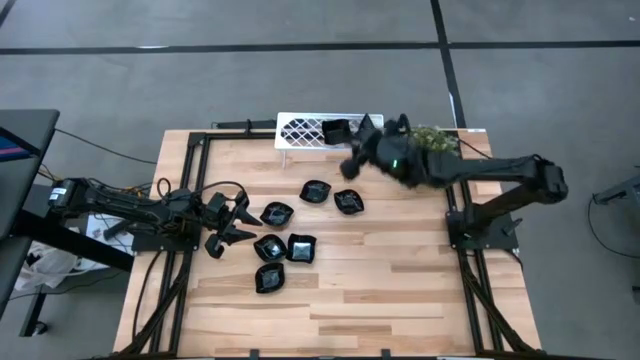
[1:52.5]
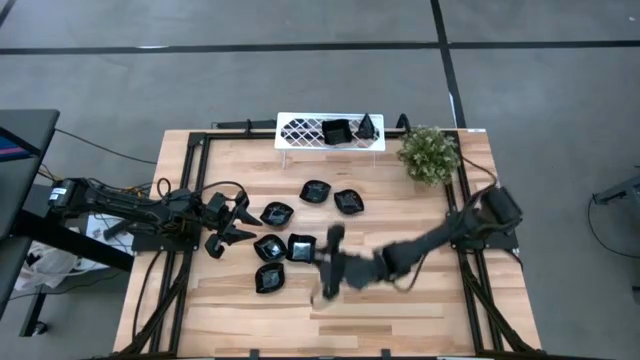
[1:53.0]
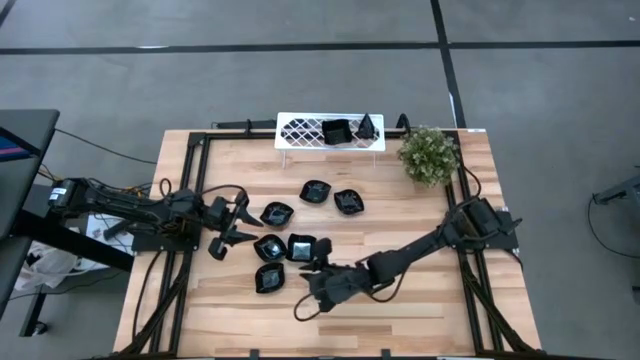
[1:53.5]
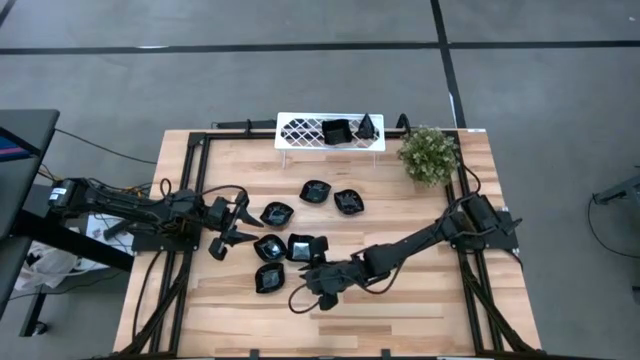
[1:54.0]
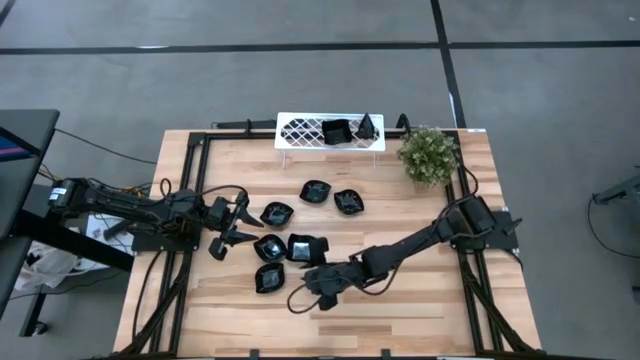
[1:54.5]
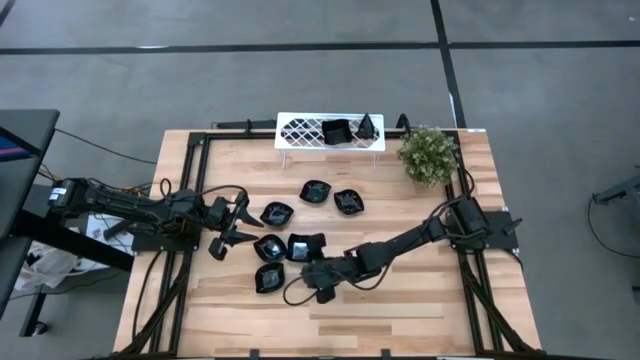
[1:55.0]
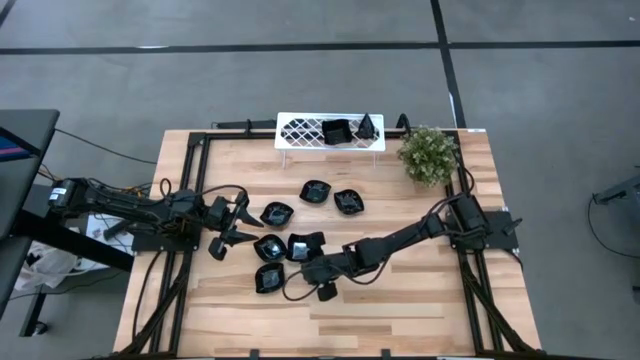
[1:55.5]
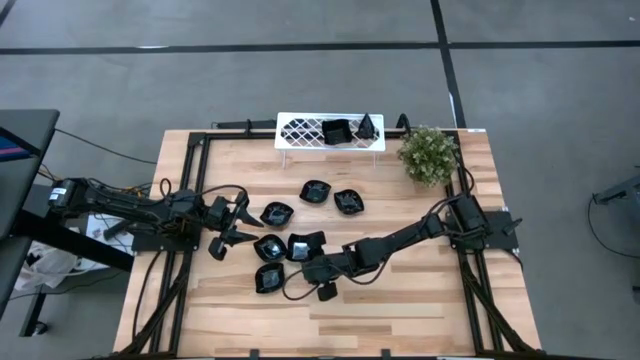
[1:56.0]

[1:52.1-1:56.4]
Task: Pick & Place Mini shaped plates
Stack the distorted square plate on top of the distorted square plates on the shelf

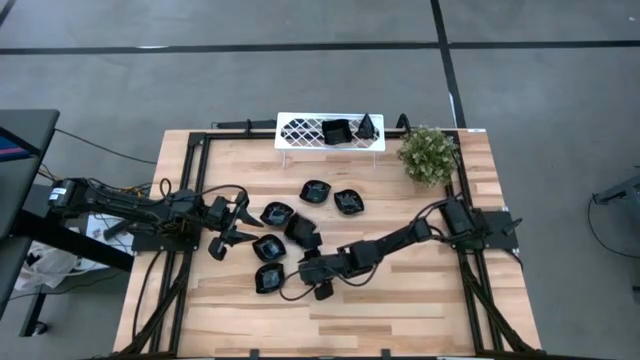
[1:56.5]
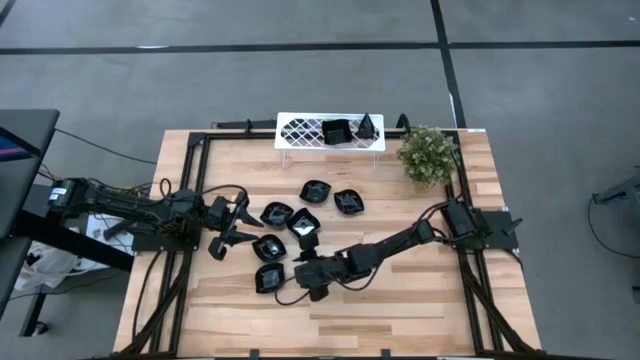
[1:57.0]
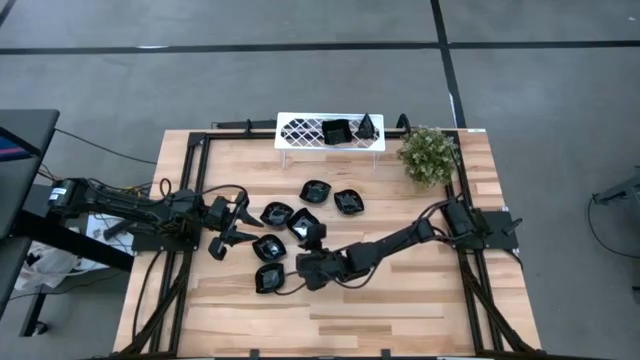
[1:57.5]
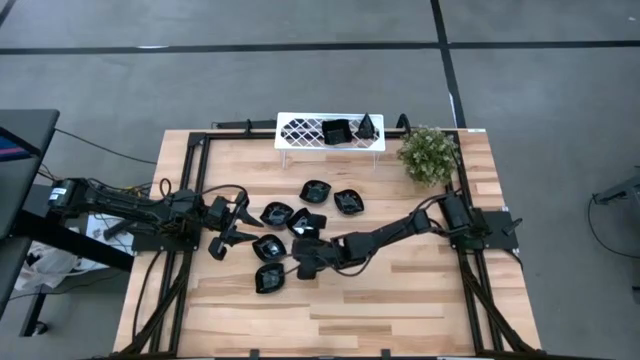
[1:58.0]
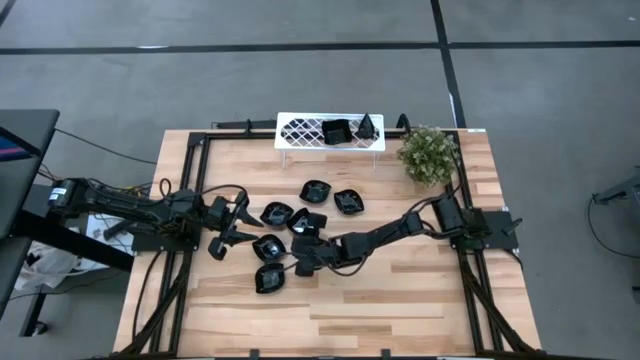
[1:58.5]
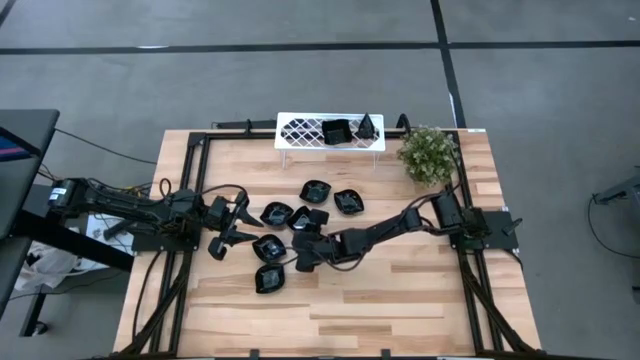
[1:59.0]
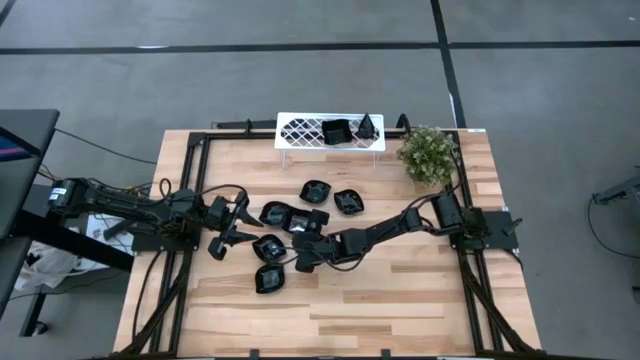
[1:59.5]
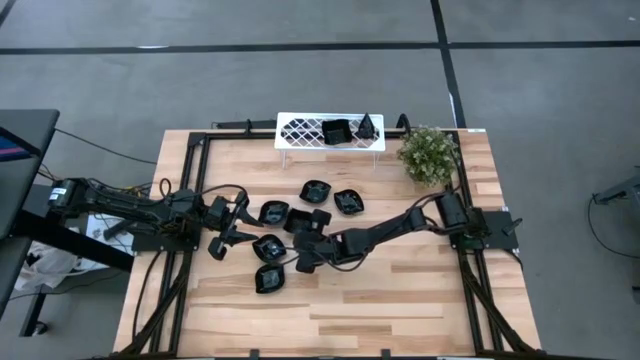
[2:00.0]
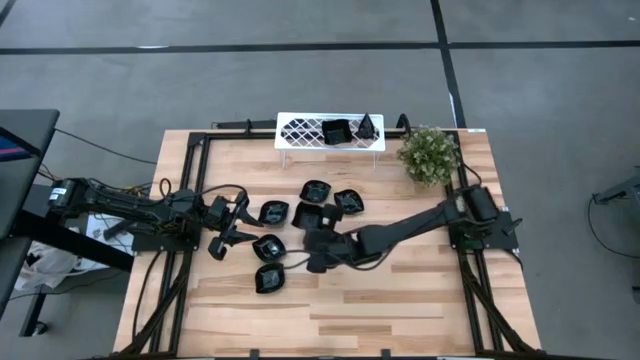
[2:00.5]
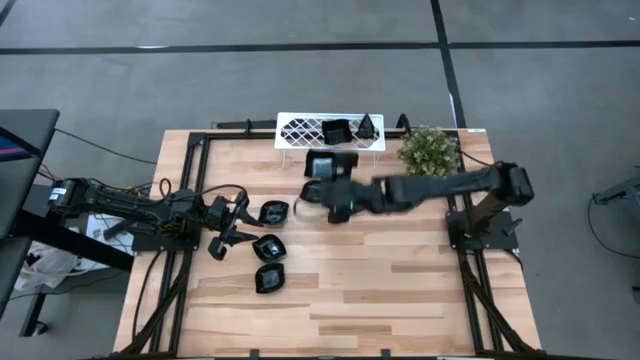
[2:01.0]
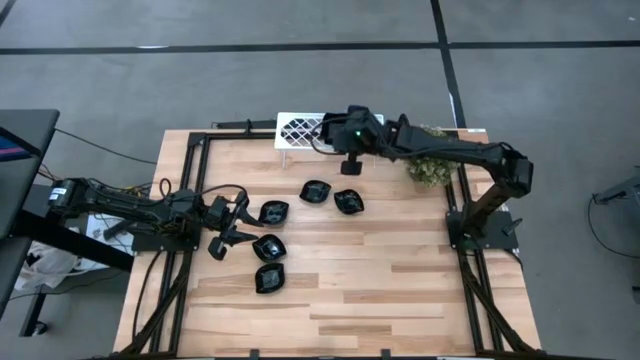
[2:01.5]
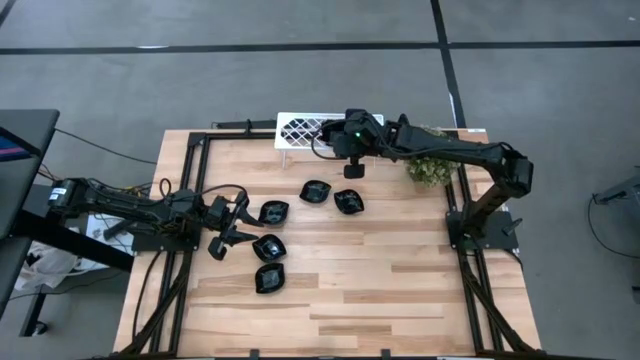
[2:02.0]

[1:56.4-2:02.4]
Stack the distorted square plate on top of the distorted square plates on the shelf

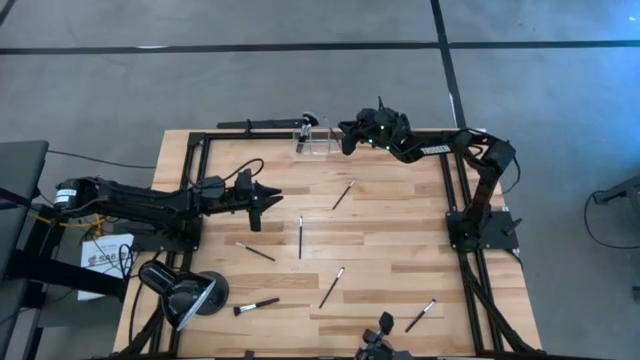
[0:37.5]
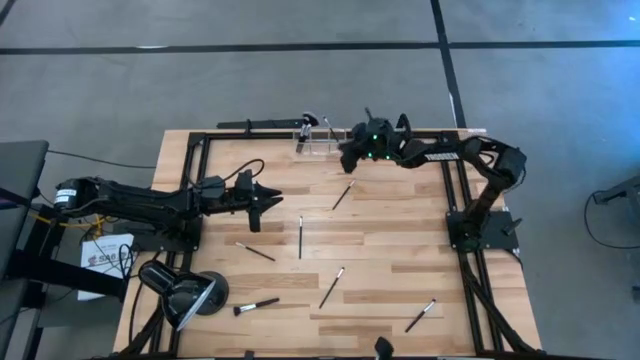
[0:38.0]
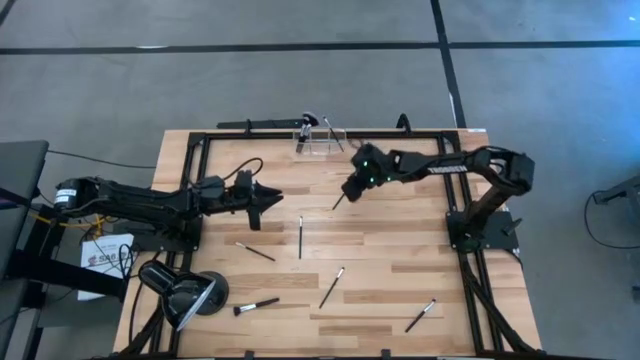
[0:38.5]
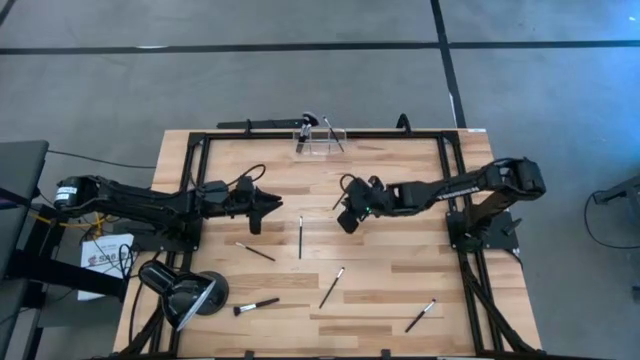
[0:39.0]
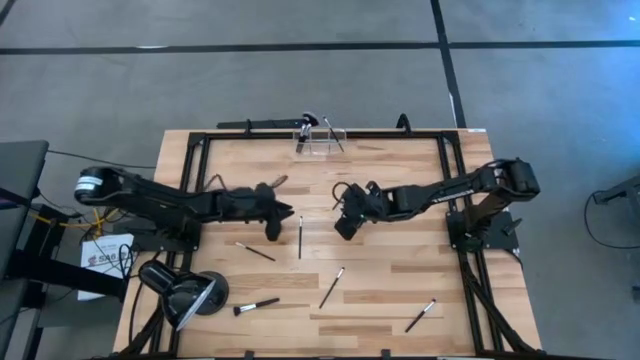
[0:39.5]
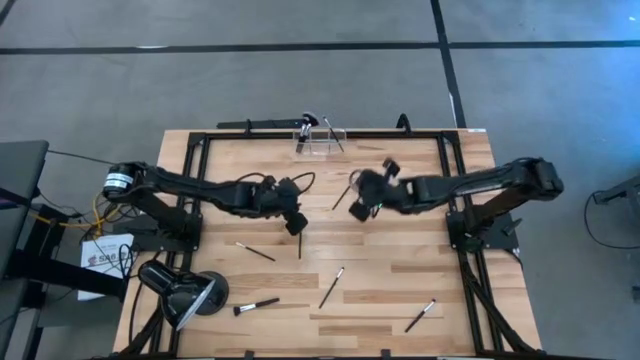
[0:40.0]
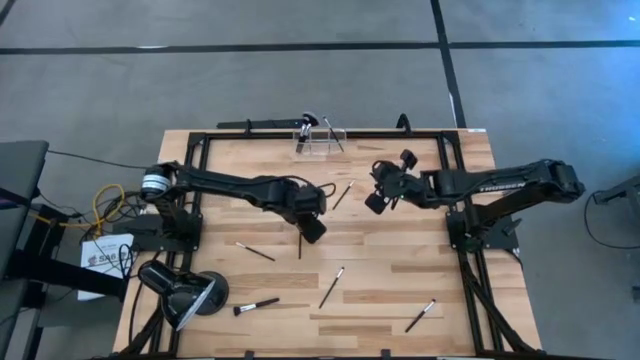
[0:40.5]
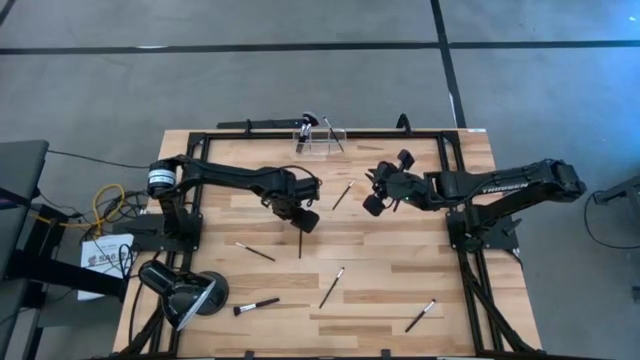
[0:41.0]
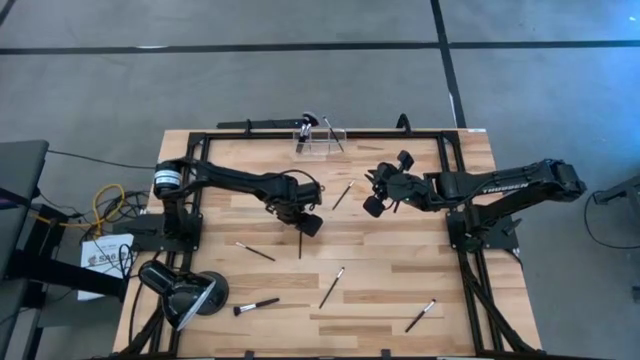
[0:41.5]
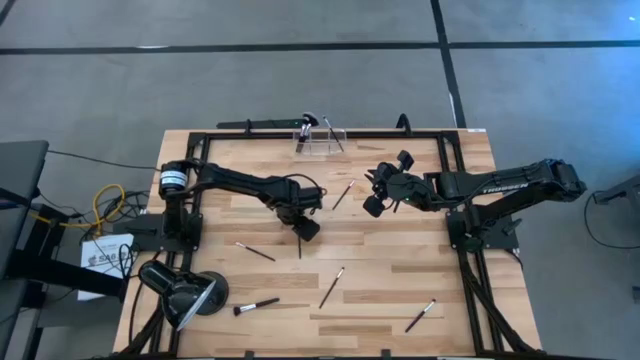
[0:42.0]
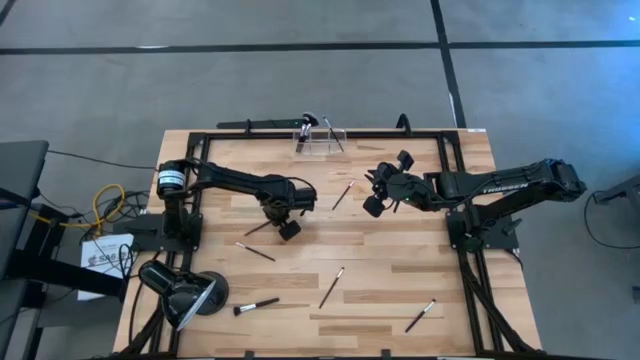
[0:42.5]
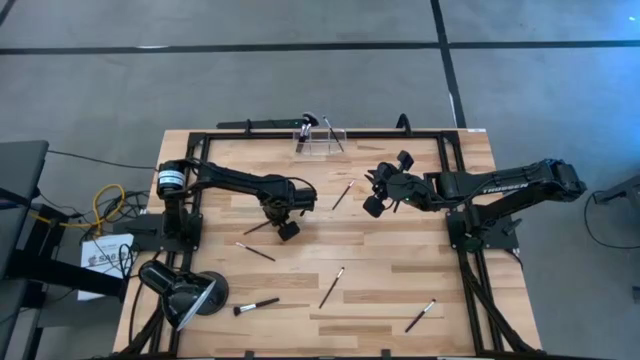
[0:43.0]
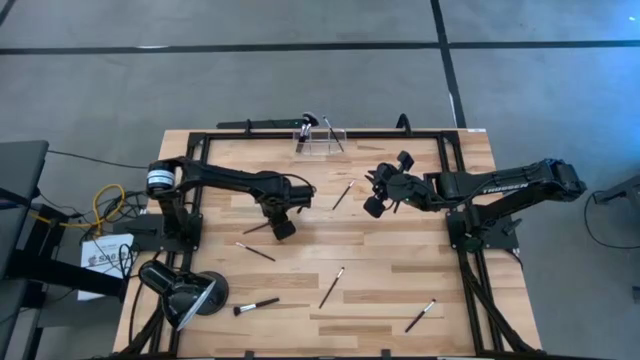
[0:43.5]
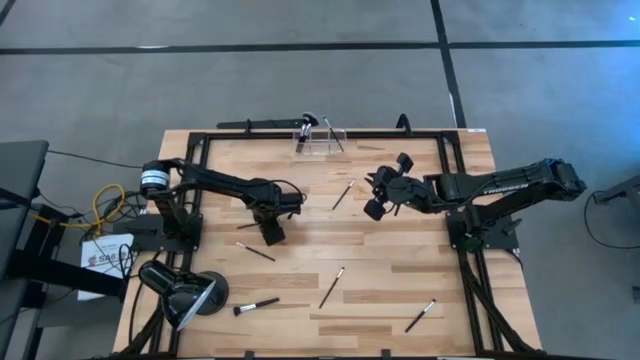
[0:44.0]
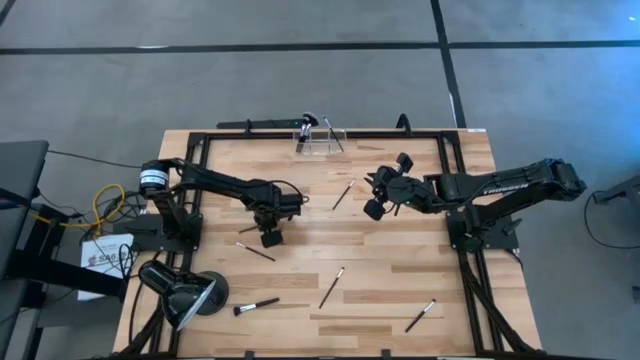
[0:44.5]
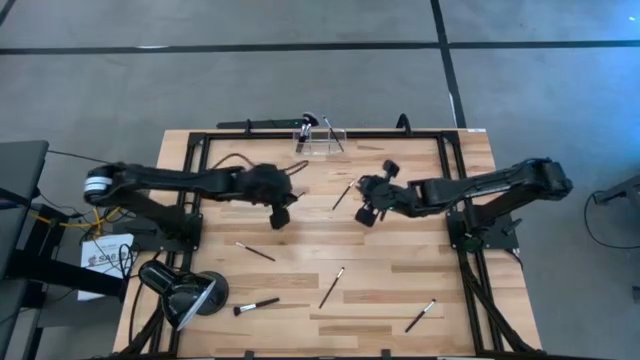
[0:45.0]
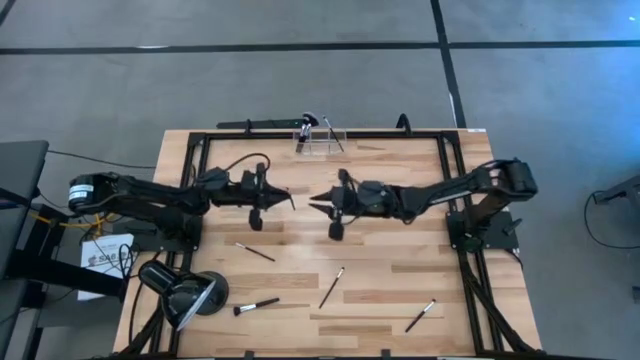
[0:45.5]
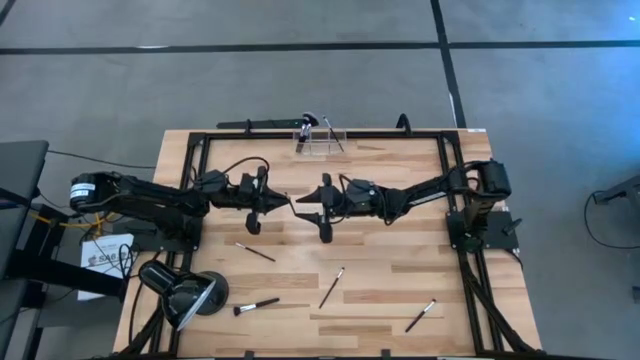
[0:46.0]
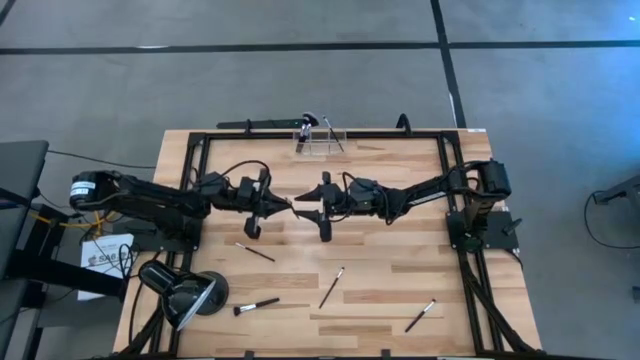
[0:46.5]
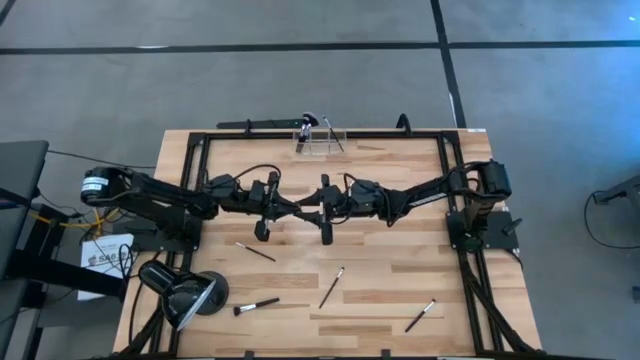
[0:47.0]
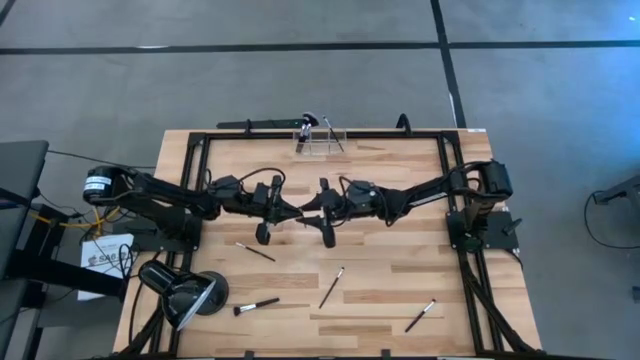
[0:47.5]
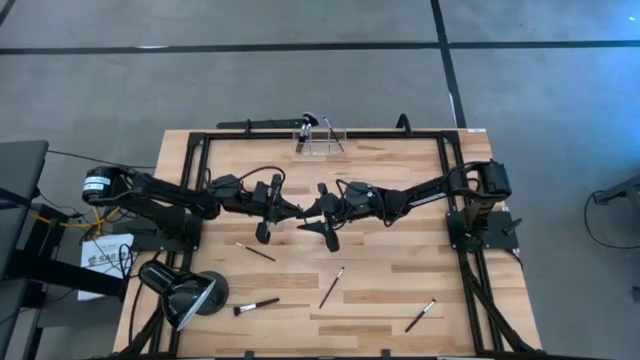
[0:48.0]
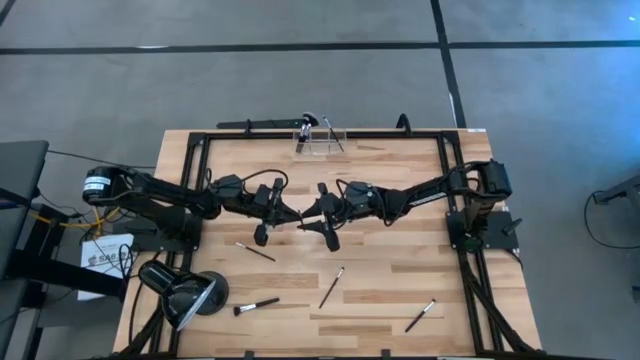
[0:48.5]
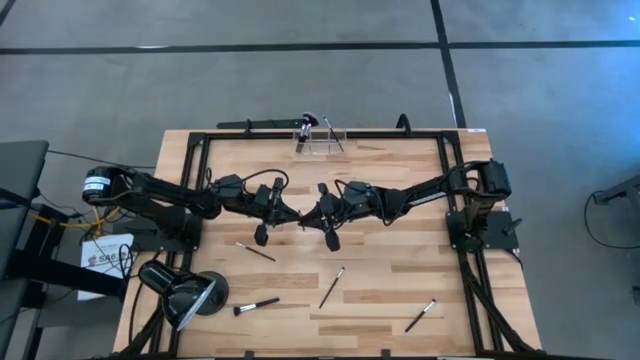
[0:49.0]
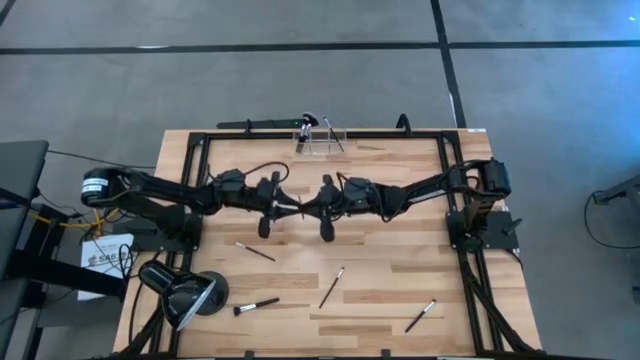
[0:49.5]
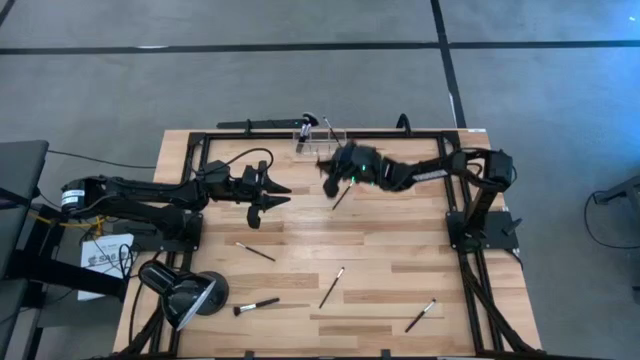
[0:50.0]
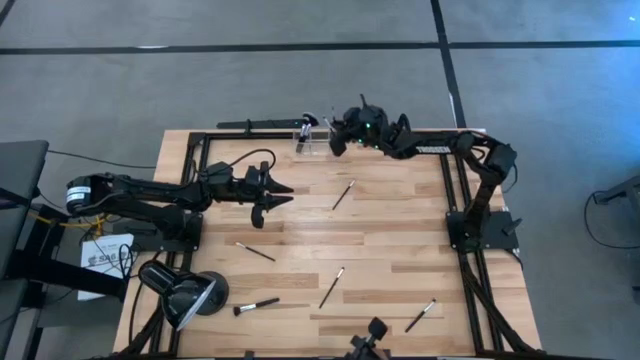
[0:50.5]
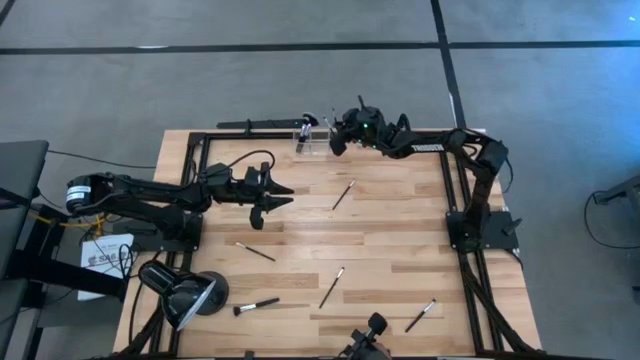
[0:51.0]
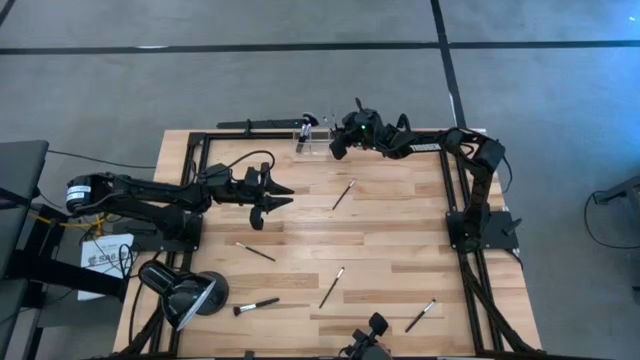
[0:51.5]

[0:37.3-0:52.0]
Task: Sort items
Put the eyeshadow brush into the right section of the transparent organizer
